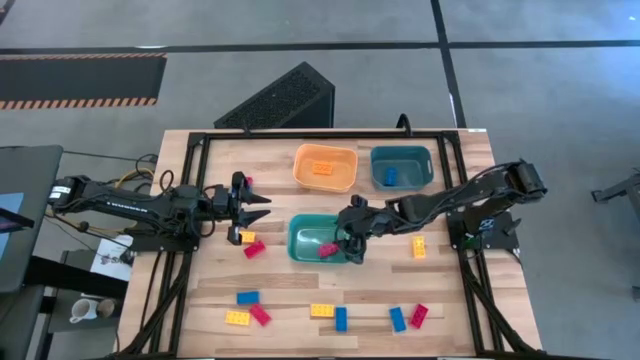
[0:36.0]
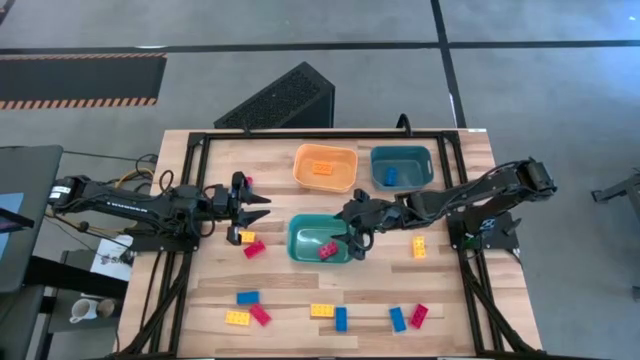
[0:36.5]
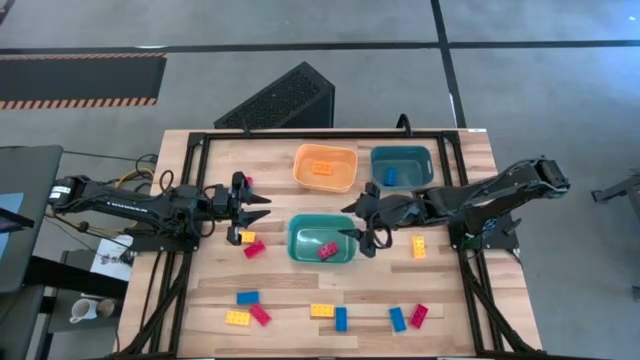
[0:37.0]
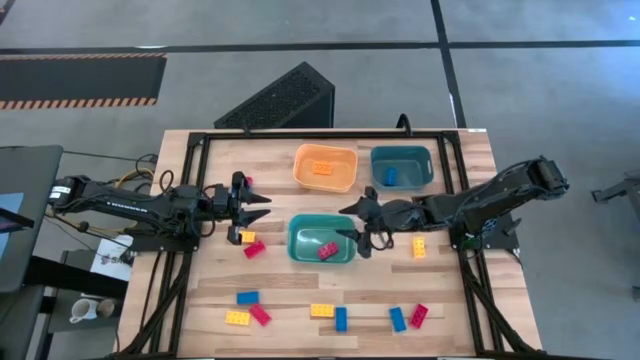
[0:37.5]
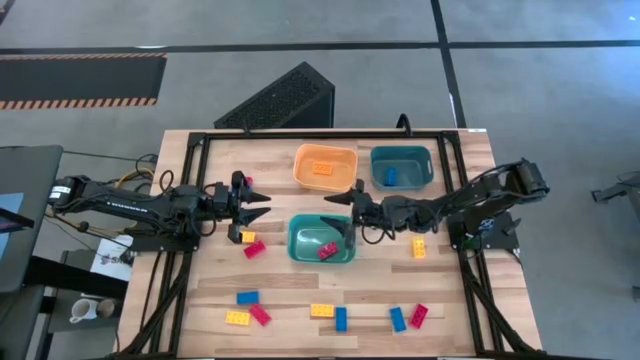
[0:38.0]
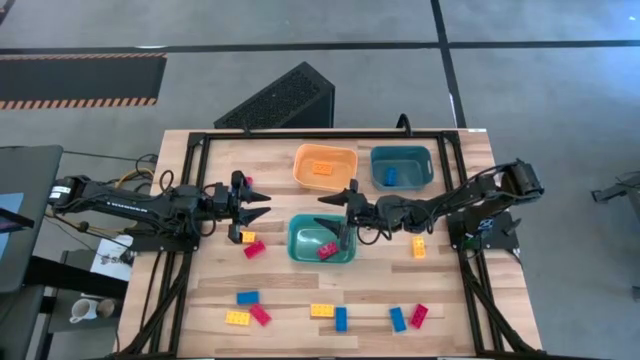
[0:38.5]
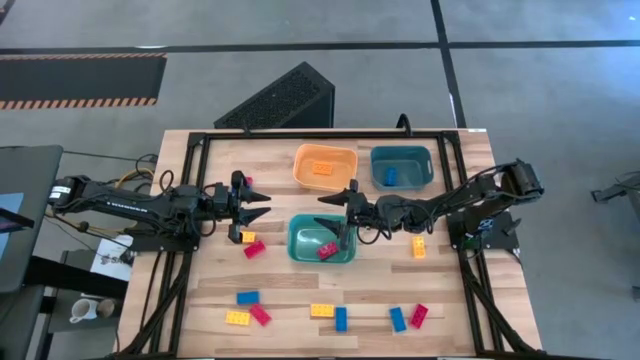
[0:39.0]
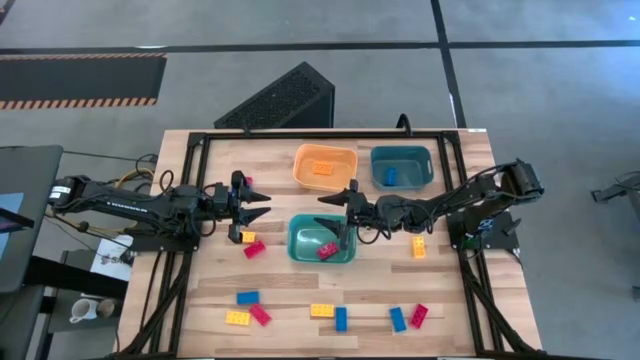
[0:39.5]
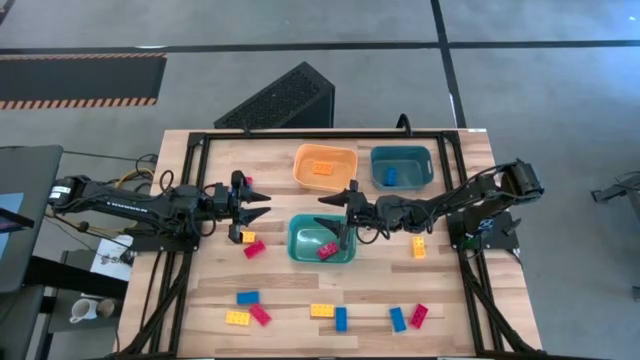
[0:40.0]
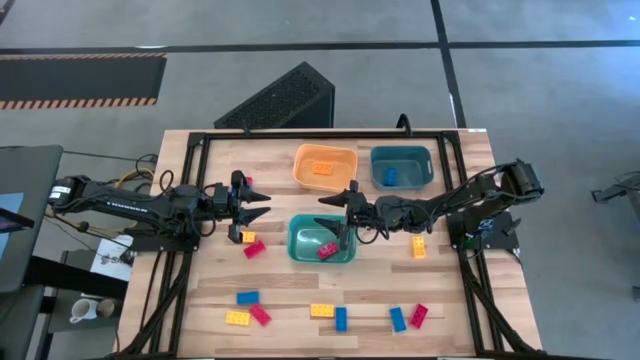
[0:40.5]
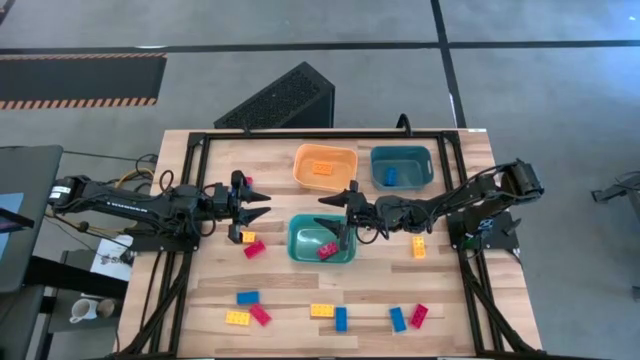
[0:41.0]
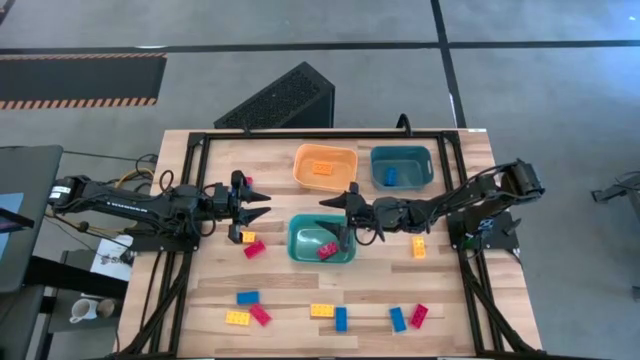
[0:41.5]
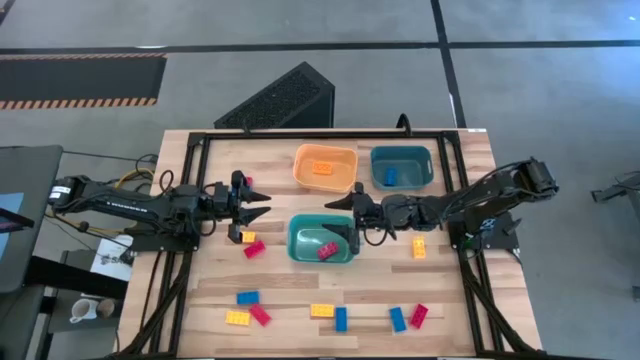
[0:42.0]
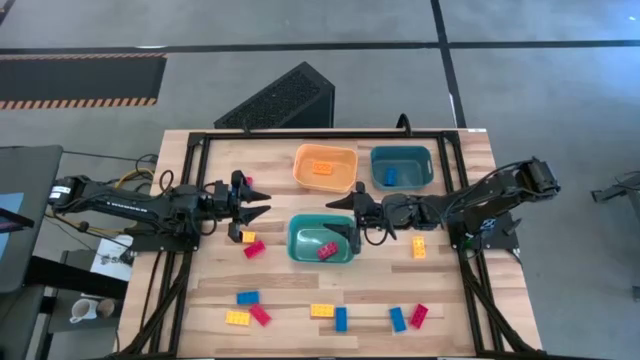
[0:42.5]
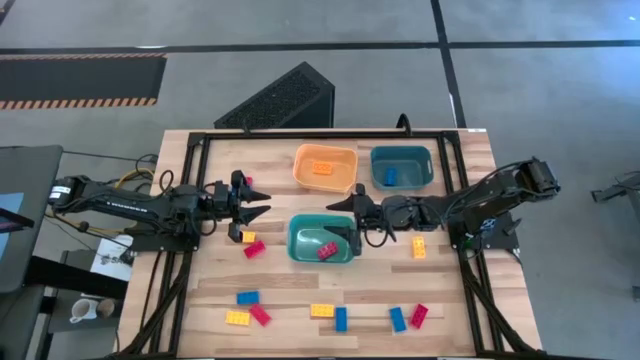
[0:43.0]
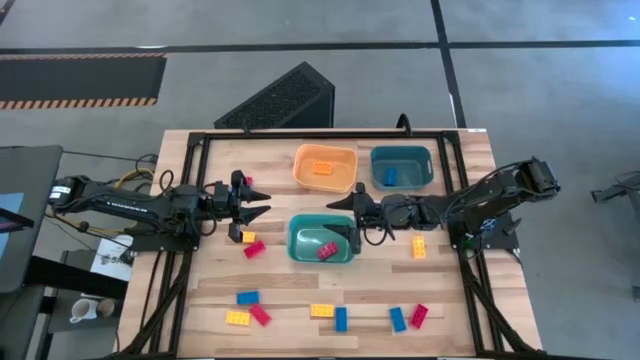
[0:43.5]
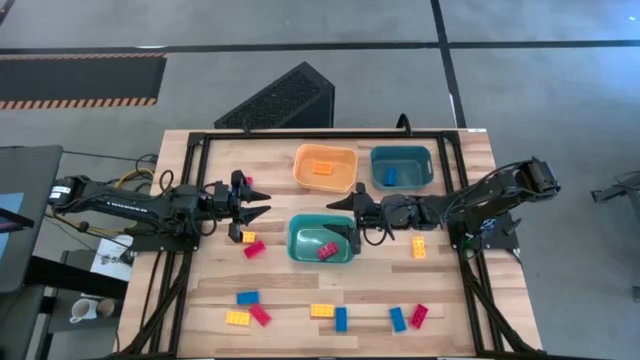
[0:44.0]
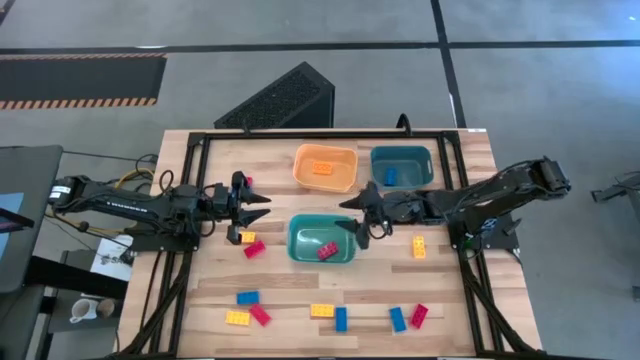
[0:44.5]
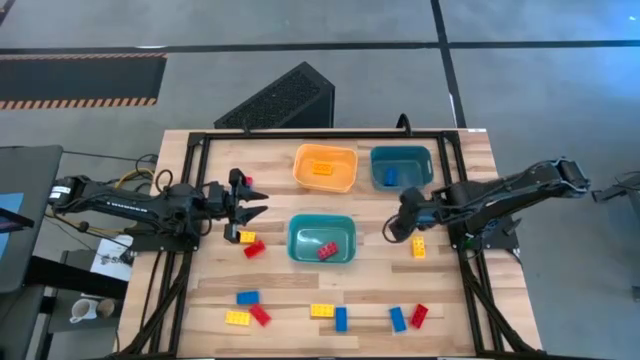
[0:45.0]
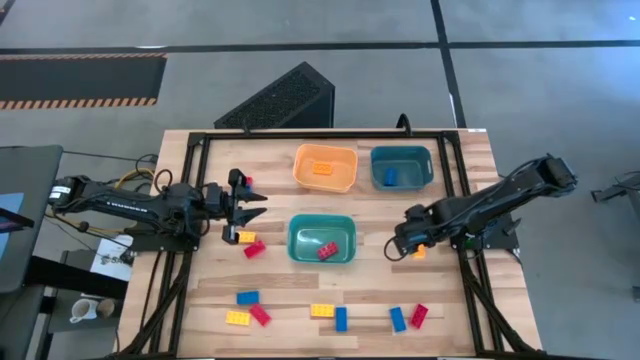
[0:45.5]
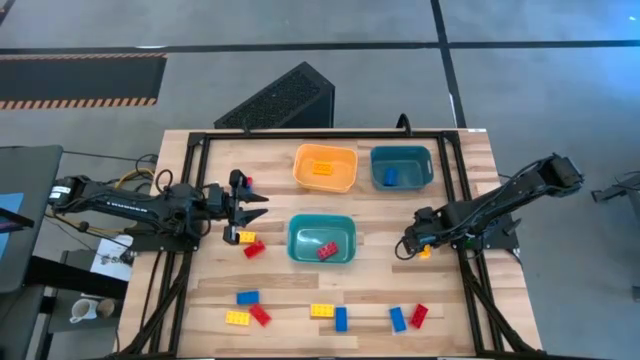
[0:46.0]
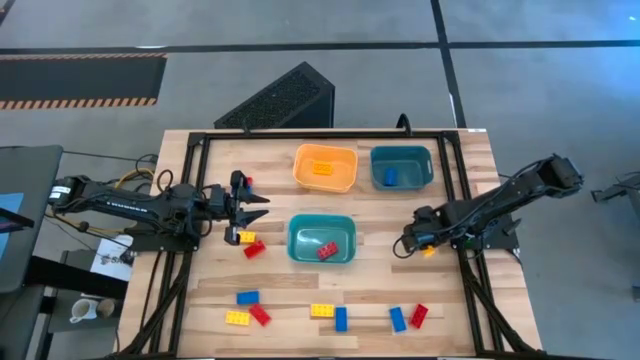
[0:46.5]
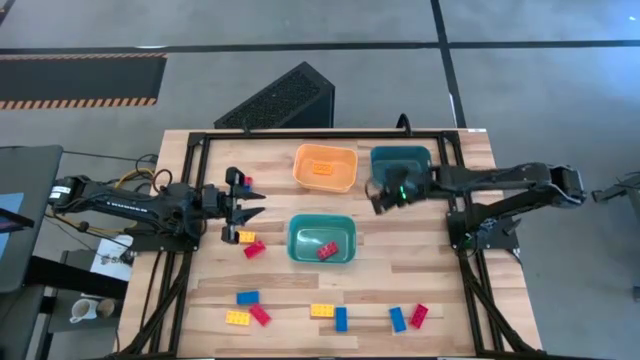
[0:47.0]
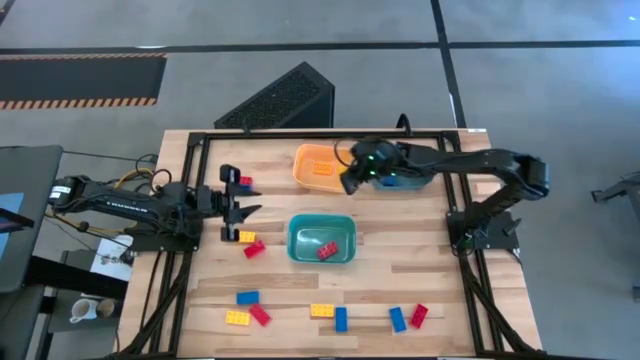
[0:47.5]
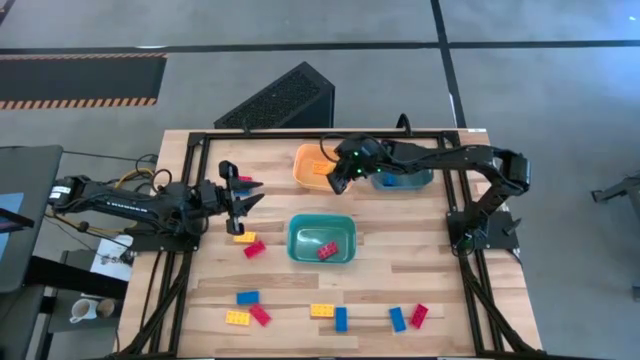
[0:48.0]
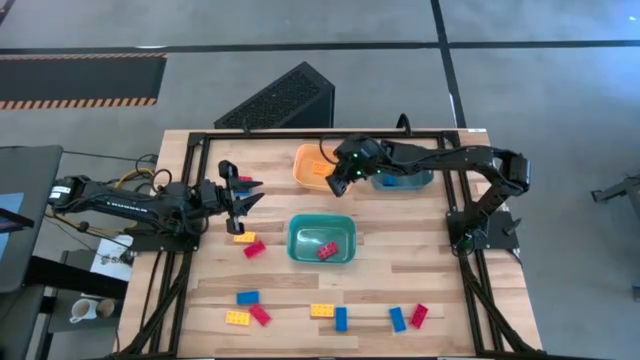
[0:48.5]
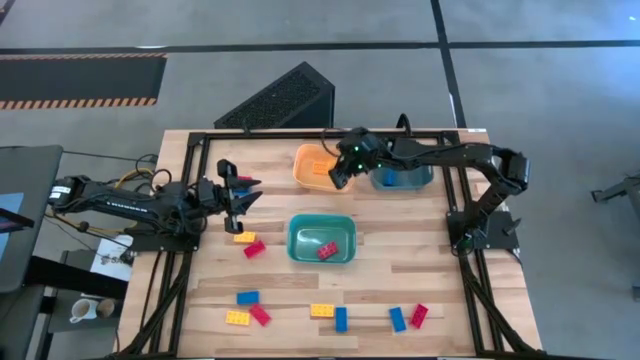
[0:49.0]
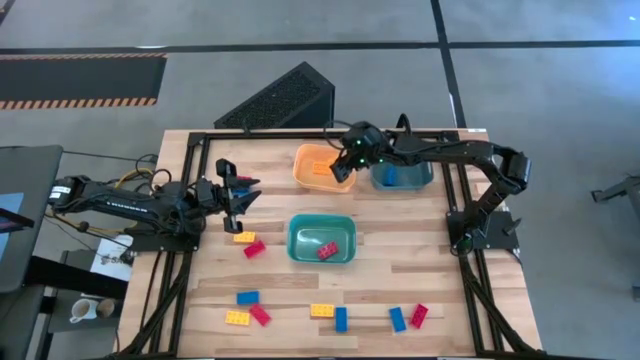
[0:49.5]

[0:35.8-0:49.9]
Task: Sort & place blocks by color
Put the yellow game piece into the yellow bin
